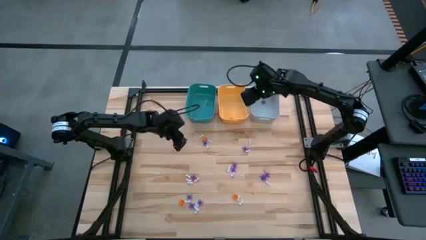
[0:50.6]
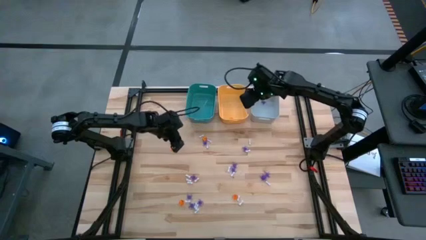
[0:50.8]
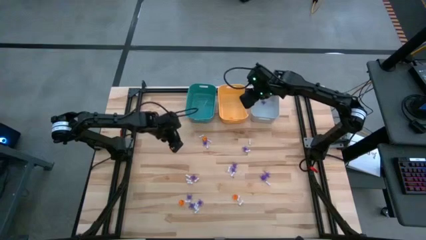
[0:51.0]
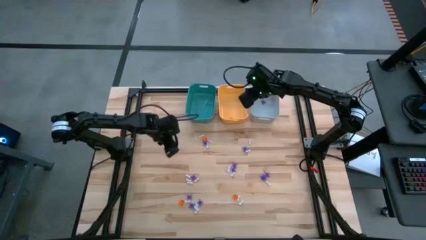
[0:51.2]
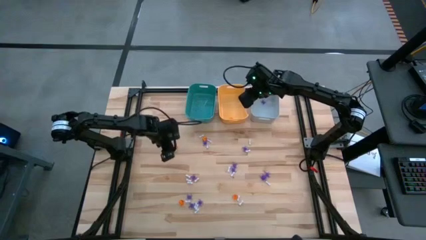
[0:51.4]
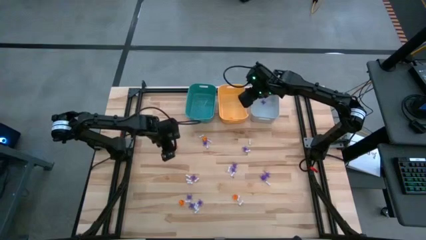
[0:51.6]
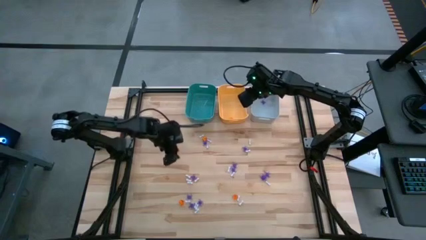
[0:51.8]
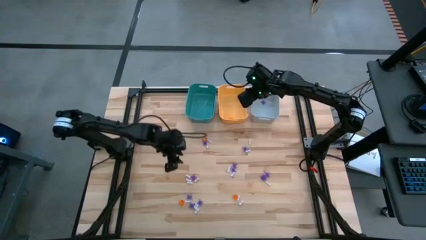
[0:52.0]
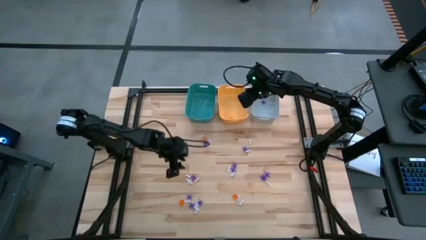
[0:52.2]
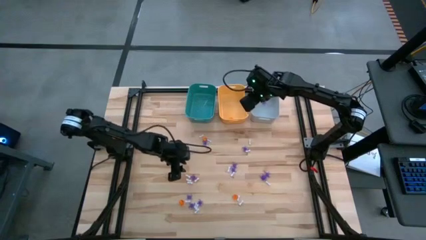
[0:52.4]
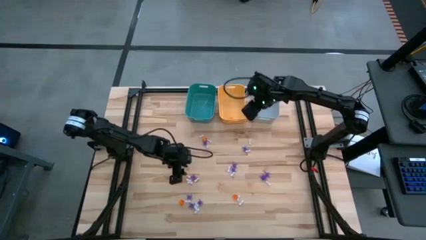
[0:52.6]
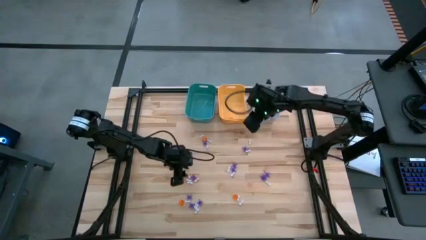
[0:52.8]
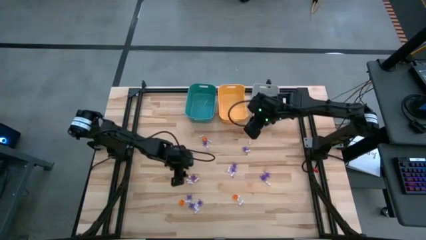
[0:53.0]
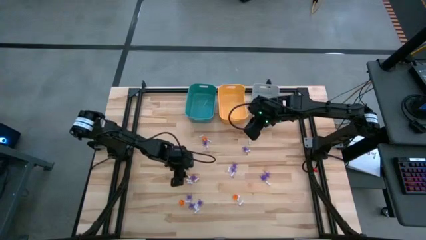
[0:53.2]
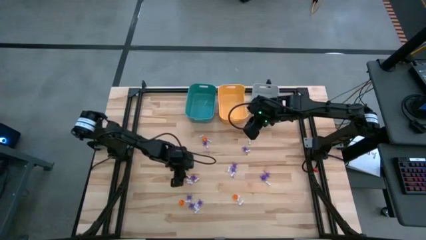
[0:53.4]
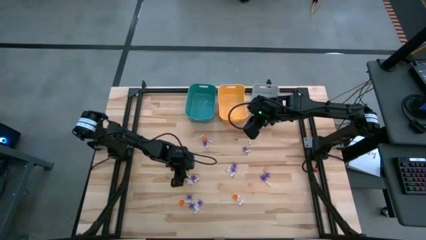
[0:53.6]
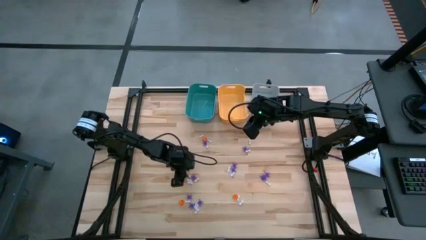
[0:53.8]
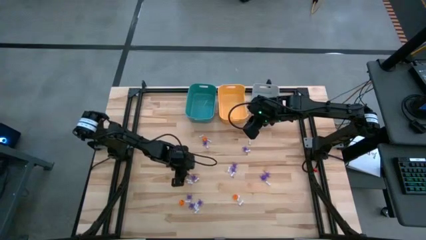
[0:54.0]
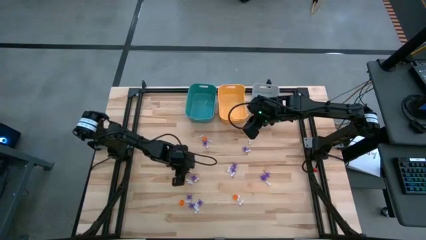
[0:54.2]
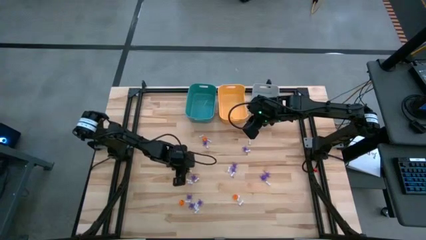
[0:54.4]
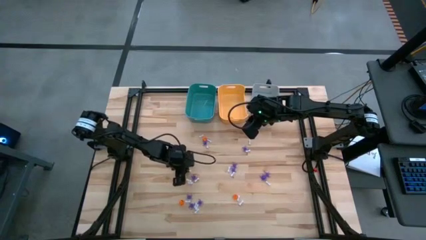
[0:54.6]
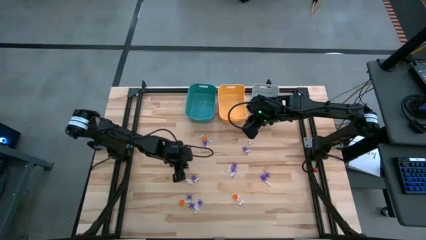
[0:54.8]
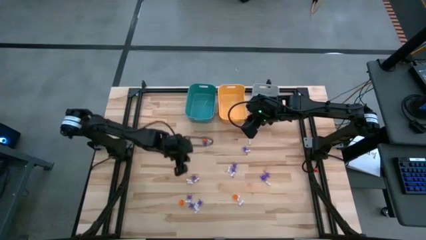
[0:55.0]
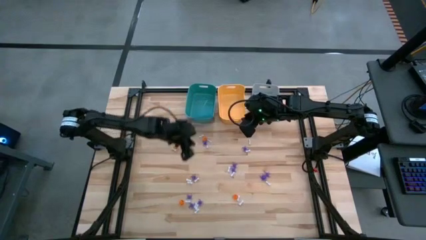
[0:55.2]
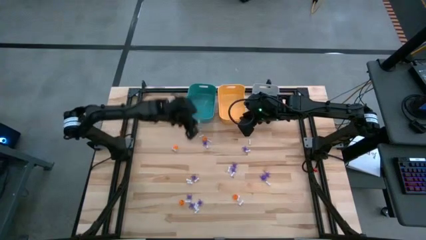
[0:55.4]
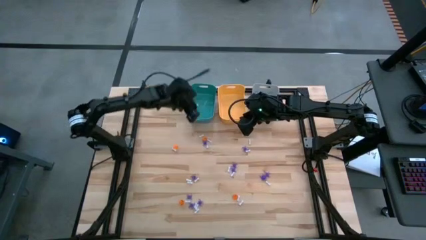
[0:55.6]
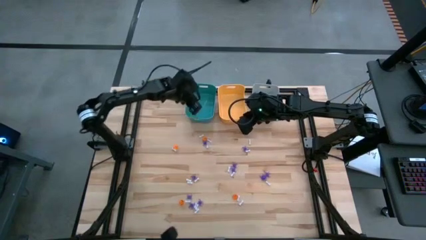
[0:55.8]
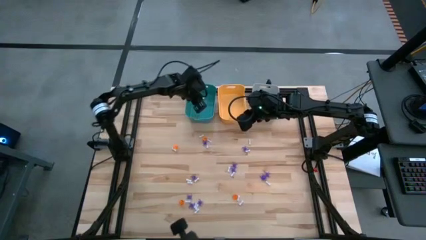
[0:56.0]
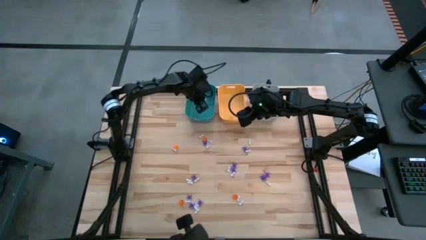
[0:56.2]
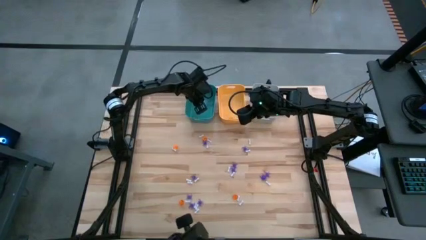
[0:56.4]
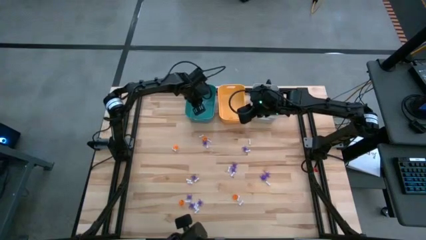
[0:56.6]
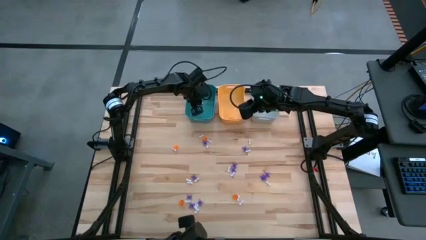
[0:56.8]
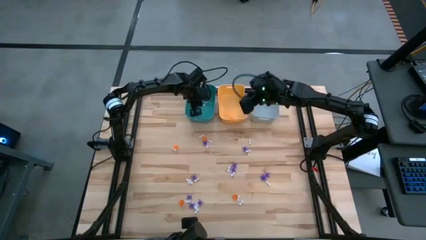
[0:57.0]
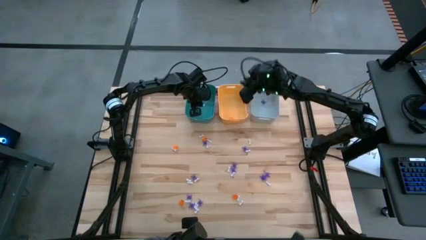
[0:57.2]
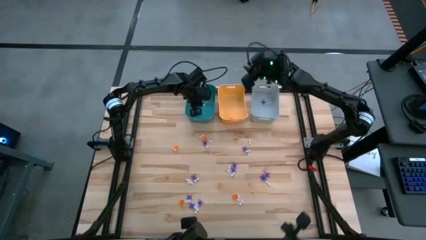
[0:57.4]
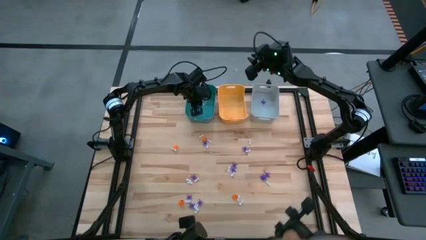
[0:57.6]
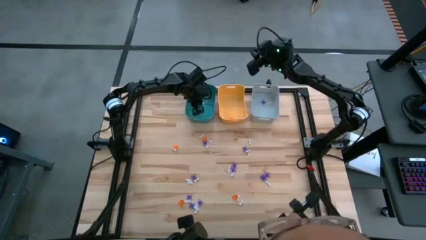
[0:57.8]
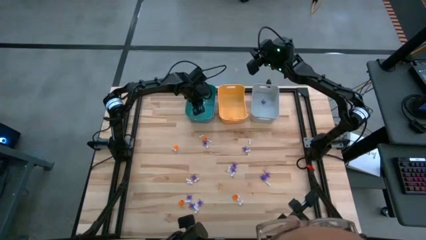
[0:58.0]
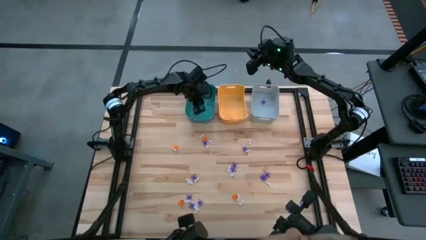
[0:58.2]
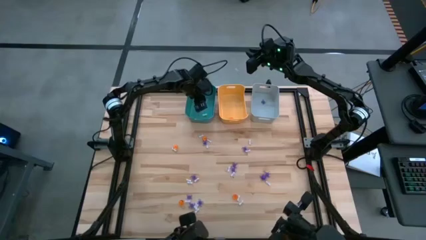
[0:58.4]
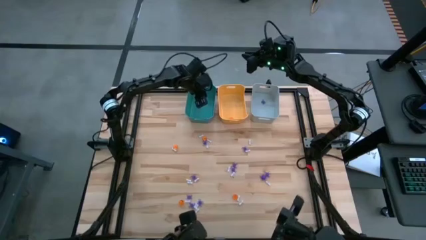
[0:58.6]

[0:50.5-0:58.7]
Task: Sort Halloween decoration
Put the white bone toy into the blue bin

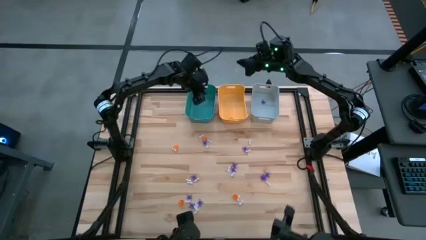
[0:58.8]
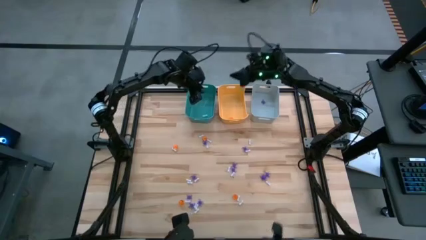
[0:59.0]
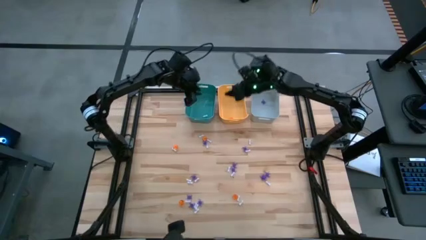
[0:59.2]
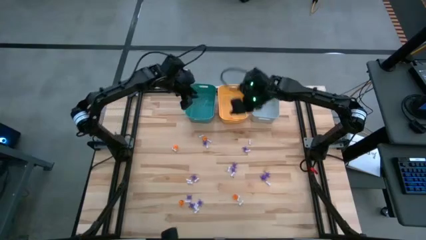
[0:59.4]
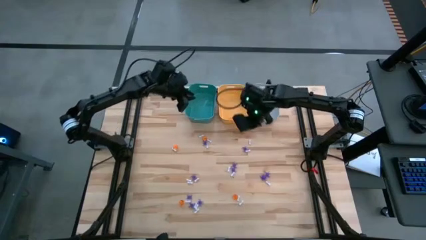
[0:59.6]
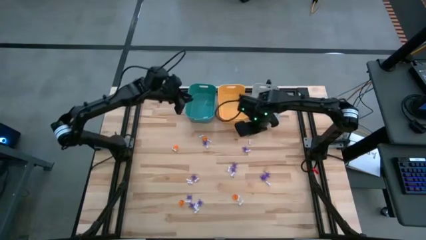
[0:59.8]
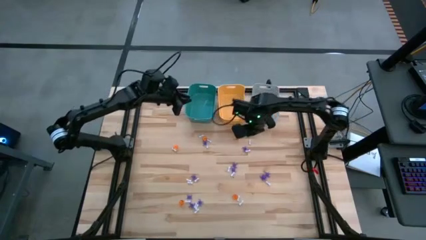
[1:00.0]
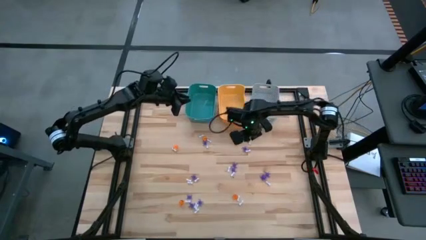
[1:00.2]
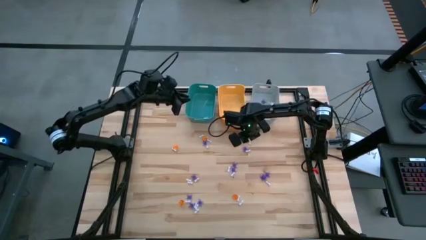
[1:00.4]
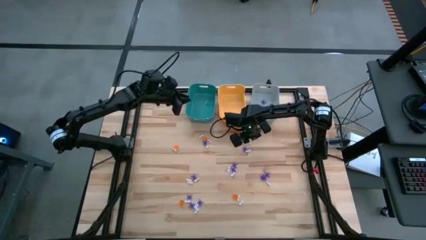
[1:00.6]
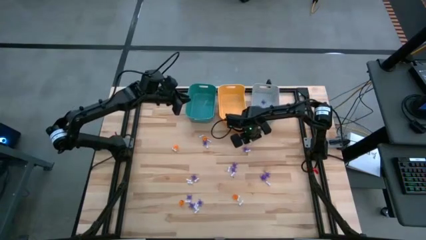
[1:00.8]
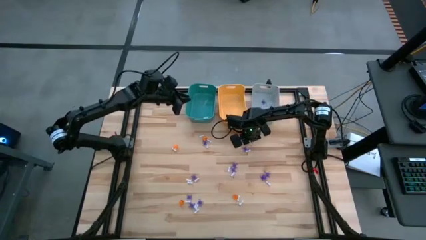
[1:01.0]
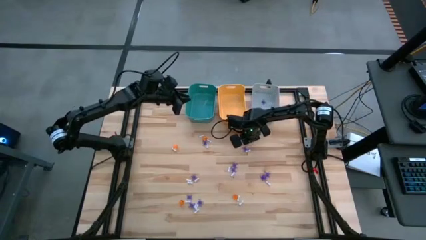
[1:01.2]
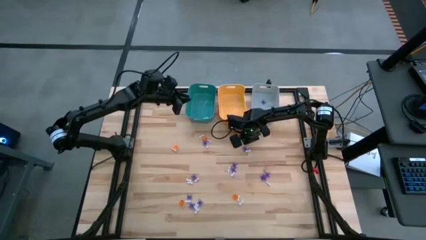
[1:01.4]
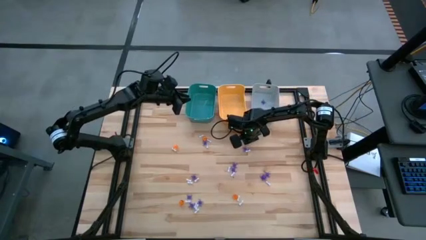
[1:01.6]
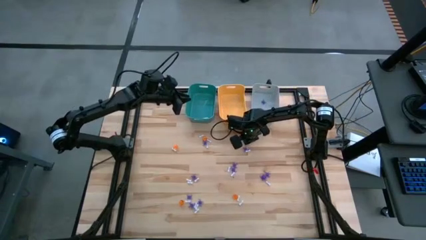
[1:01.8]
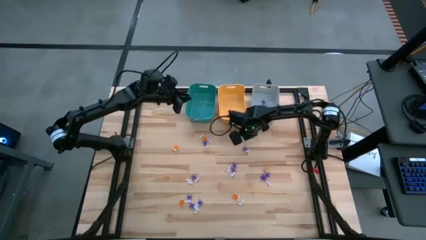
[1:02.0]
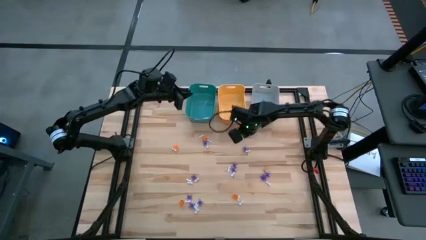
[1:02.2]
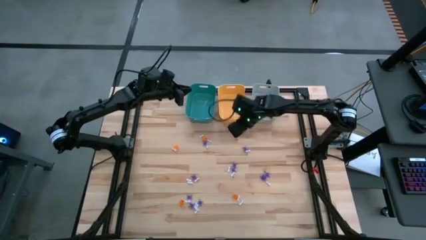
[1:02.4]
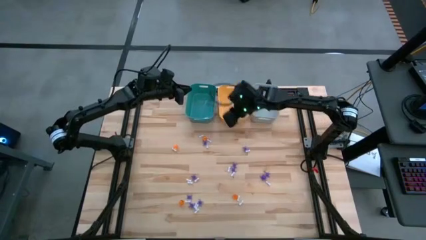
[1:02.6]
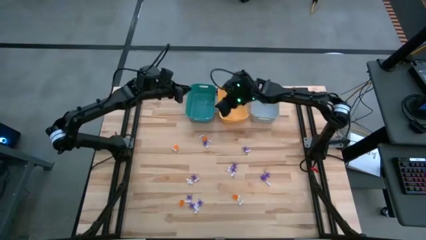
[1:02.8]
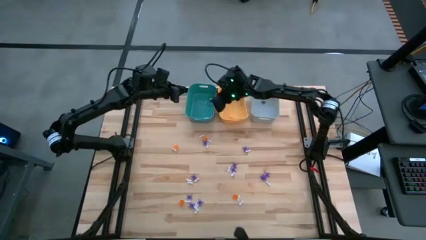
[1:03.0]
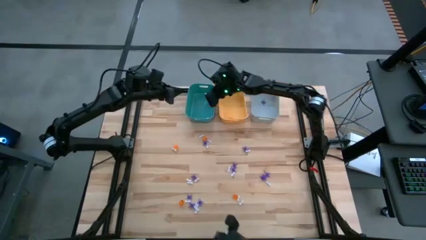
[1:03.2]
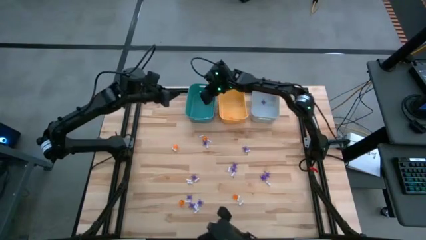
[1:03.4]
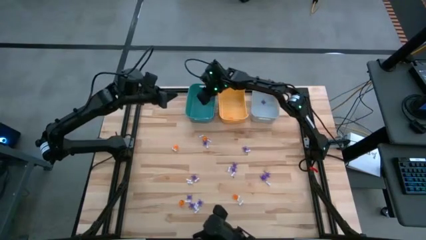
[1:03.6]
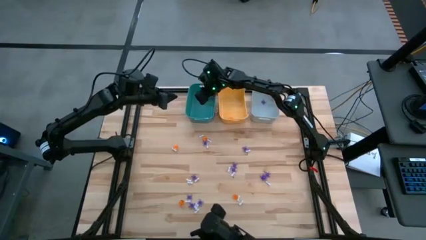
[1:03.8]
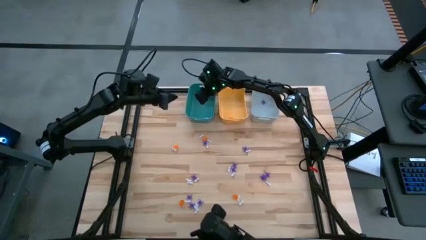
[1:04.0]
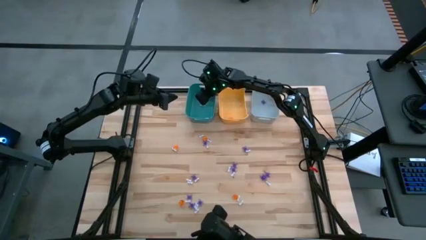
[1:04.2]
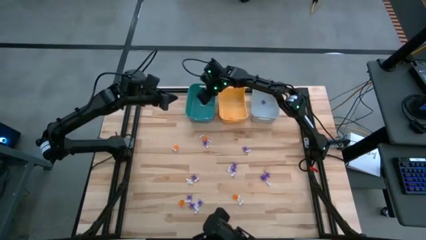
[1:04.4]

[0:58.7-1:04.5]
Put the white bone toy into the blue bin
